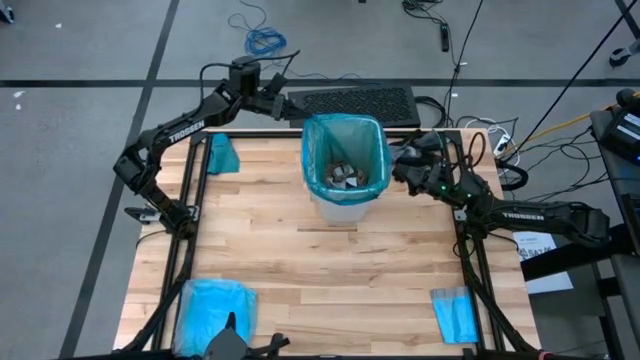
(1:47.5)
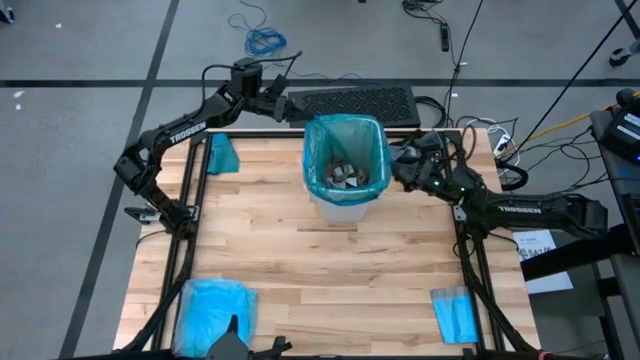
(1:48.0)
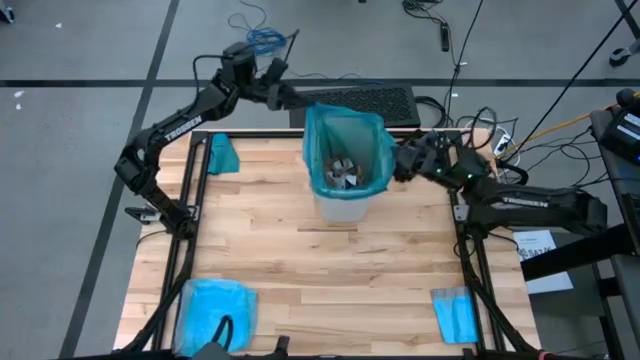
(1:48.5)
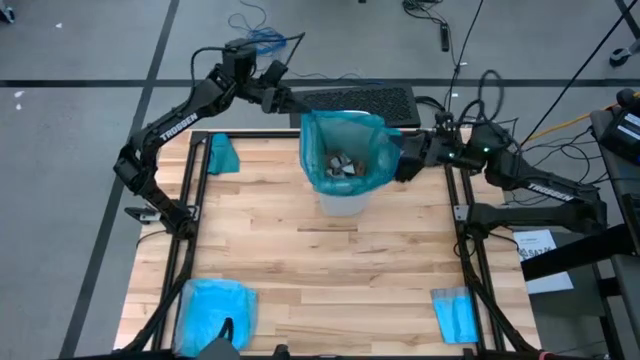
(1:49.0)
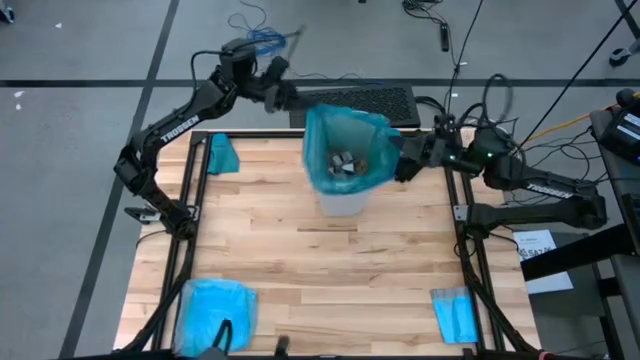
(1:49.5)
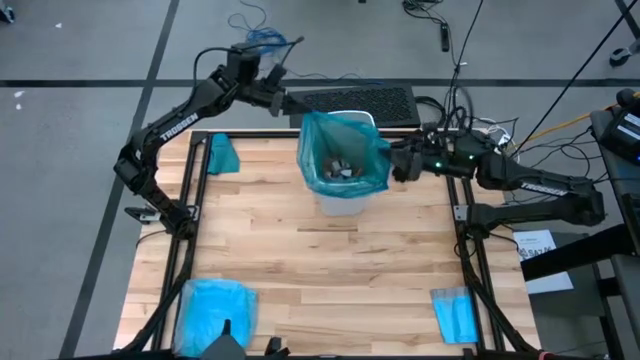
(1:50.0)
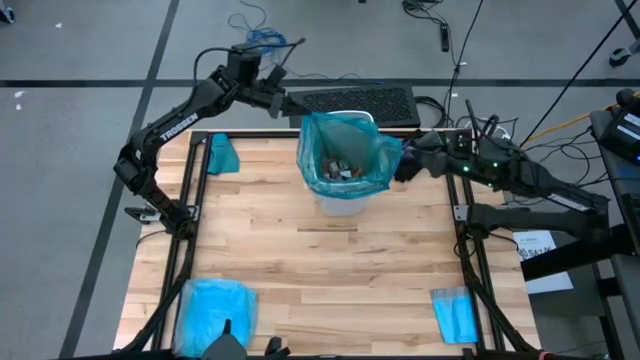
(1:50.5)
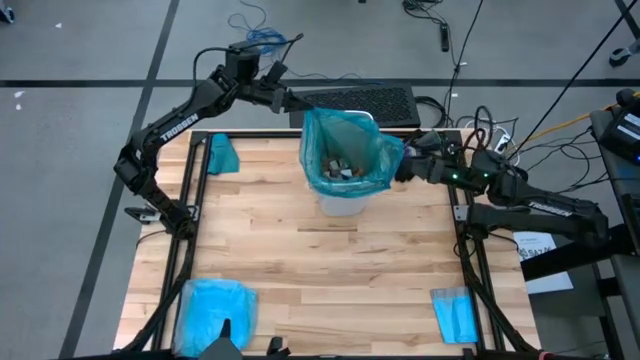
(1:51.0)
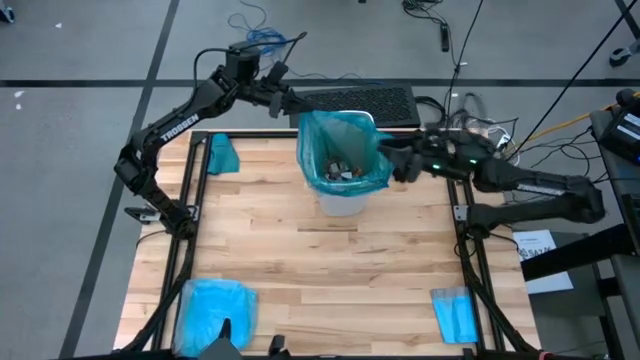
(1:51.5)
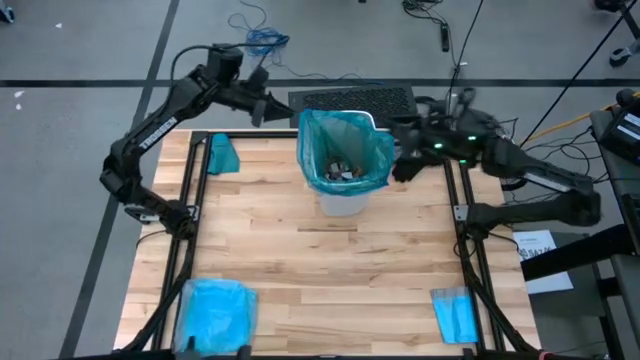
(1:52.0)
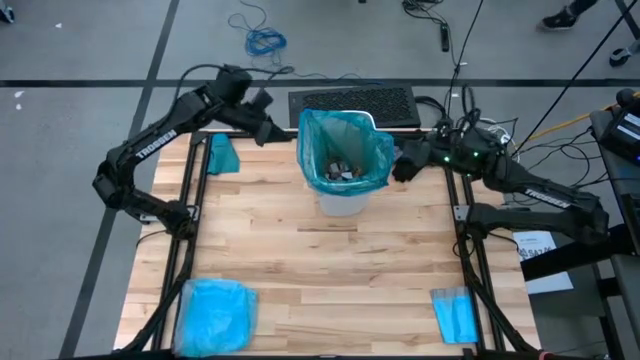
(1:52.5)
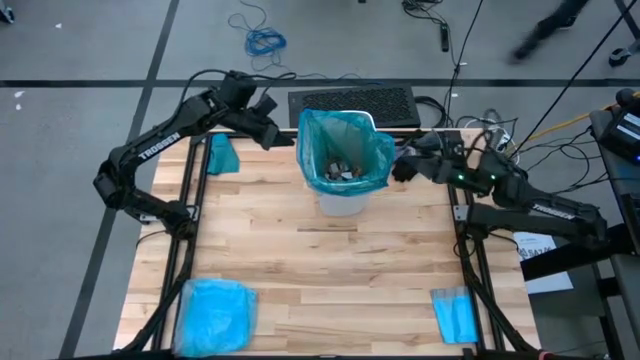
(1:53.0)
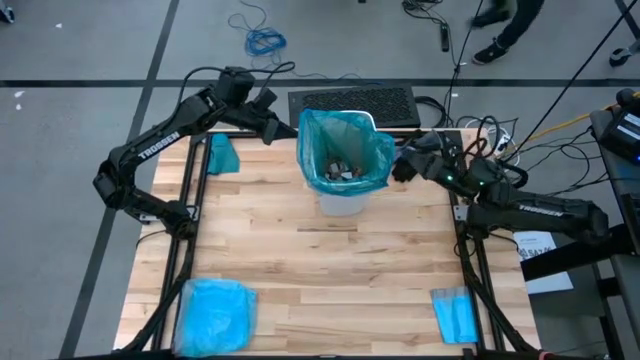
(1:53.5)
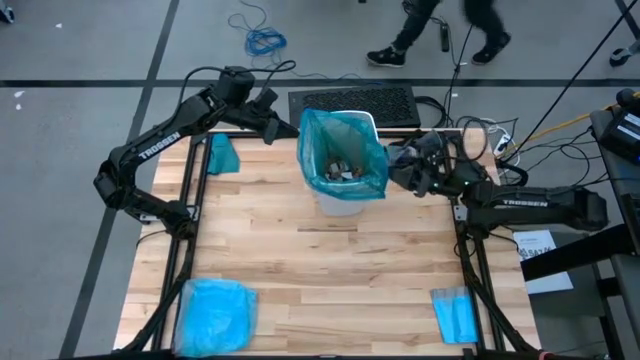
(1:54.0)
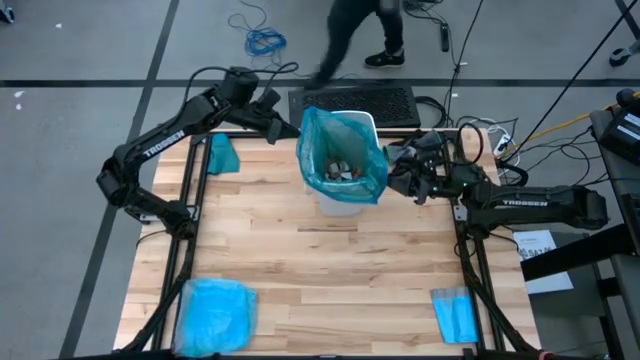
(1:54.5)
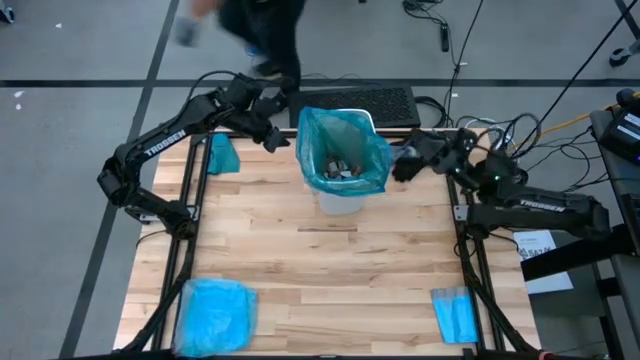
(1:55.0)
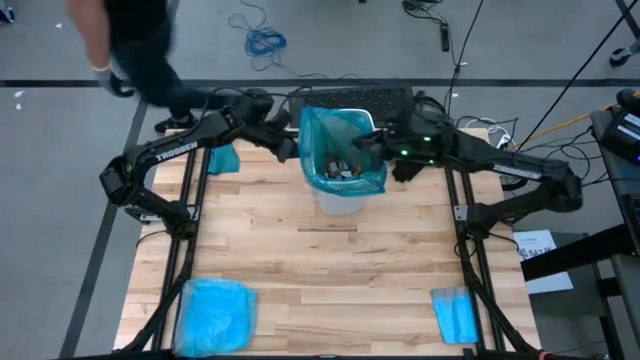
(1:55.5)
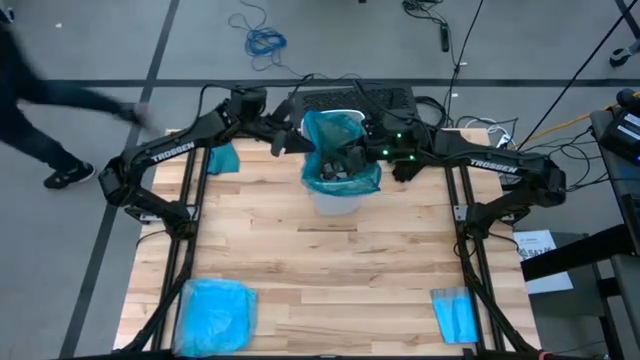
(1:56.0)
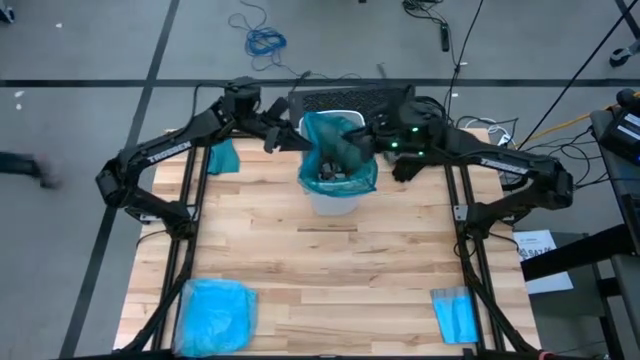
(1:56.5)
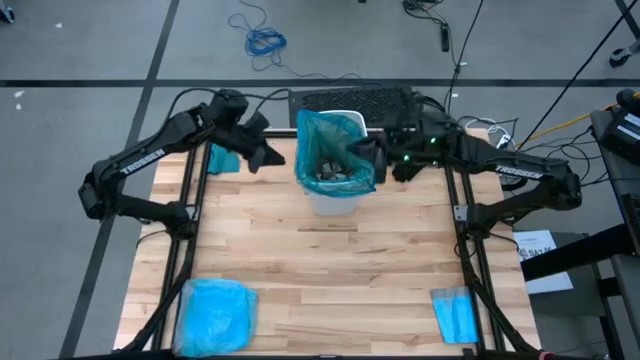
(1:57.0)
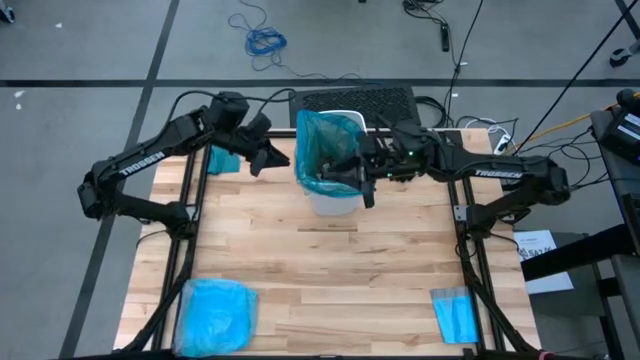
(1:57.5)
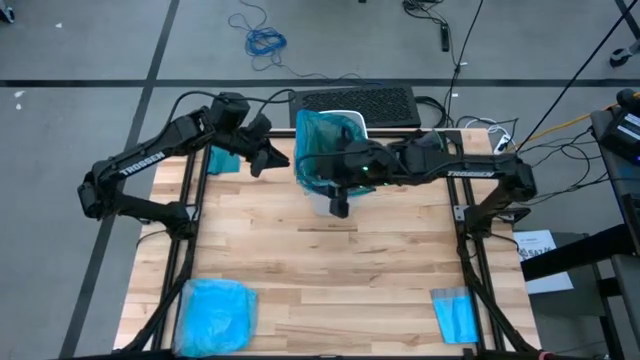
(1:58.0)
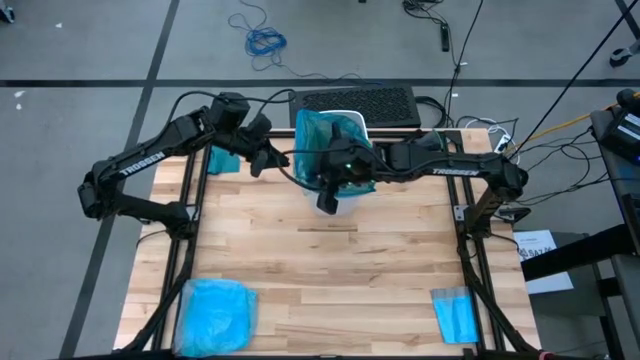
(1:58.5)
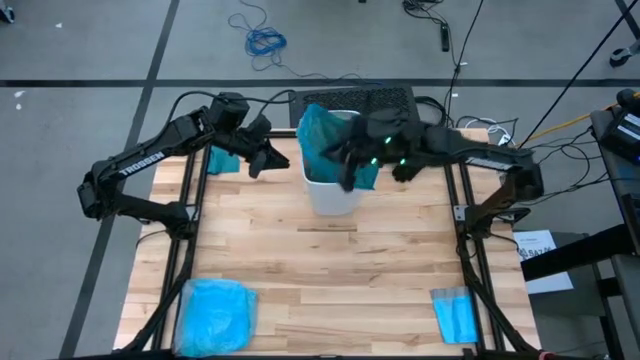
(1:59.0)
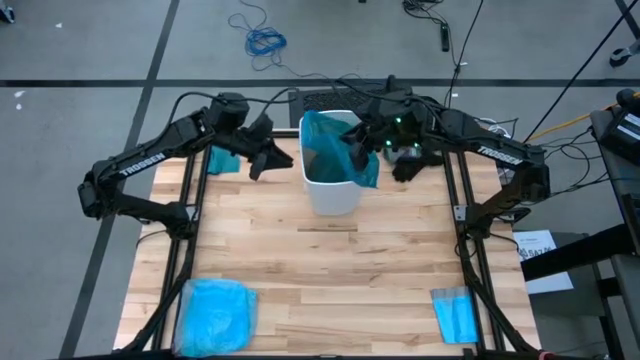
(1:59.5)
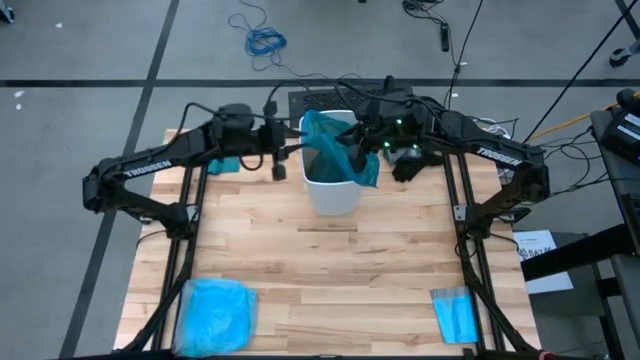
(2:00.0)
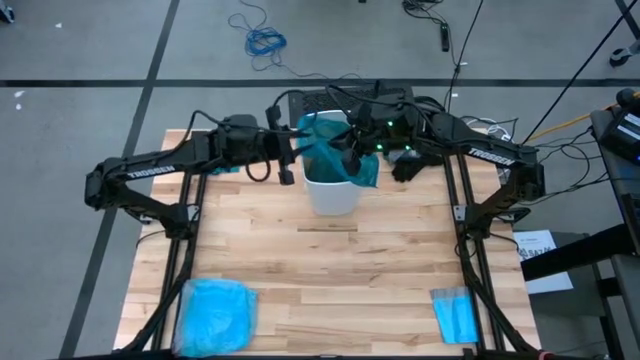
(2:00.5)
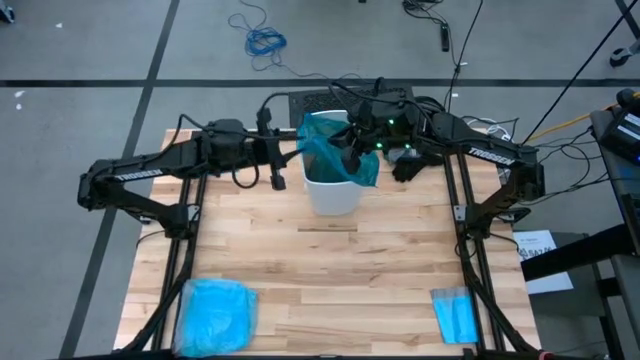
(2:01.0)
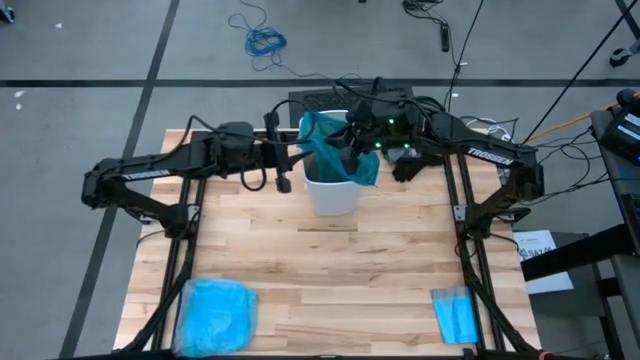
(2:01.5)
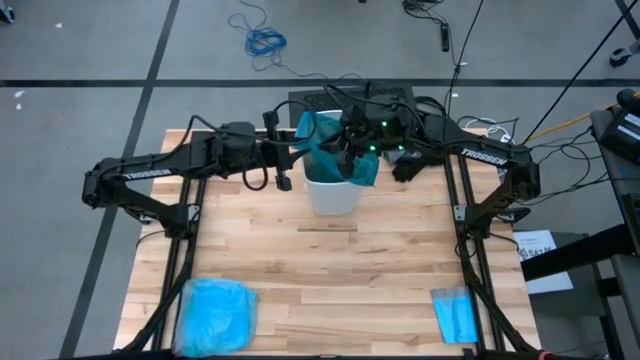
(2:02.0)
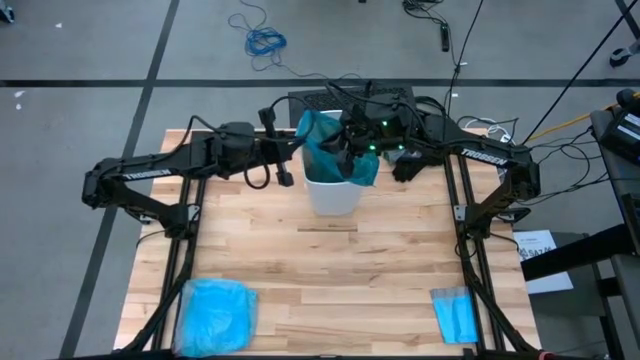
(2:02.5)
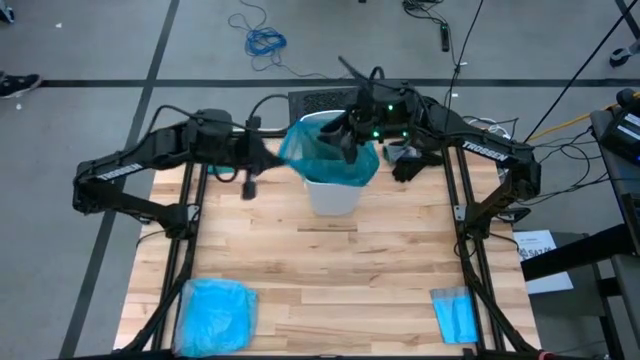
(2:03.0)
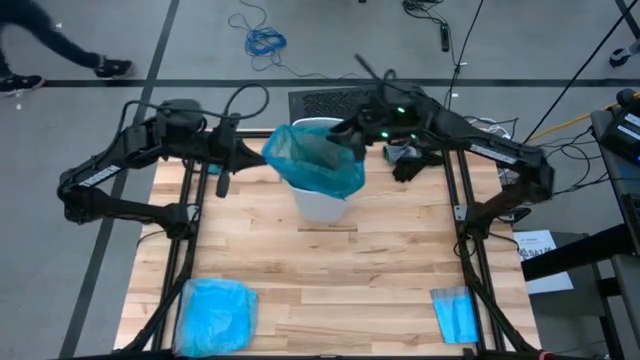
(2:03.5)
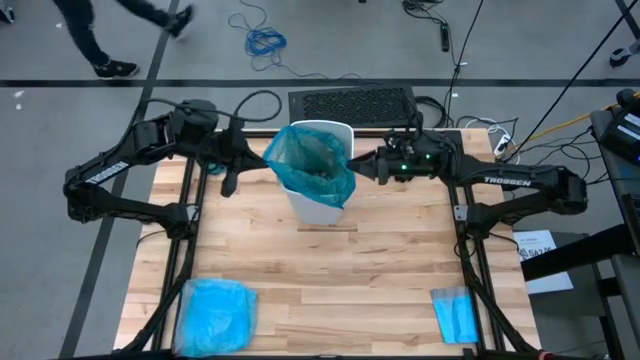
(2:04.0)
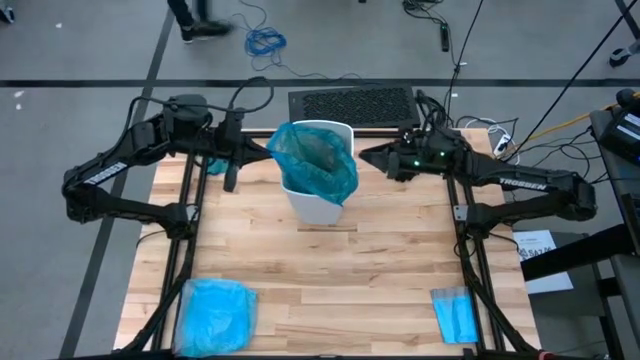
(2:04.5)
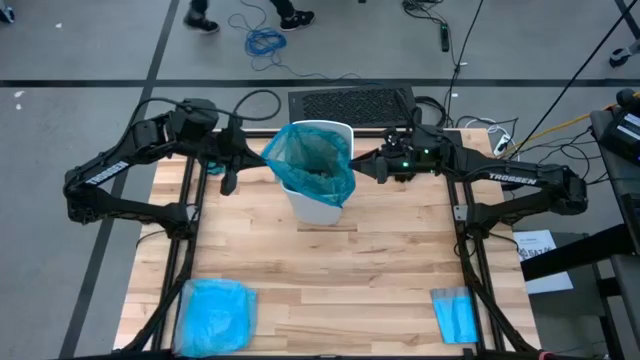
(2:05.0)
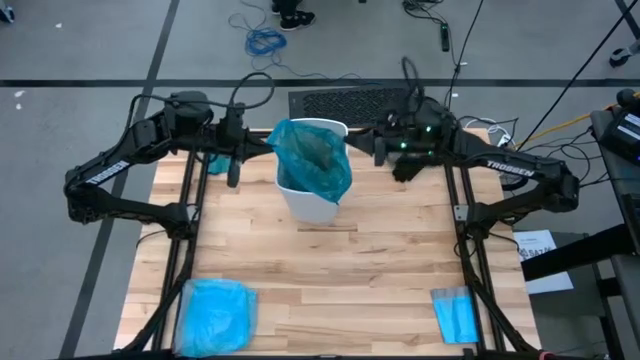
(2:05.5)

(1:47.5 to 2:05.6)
Task: place trash/remove bag and relplace
Remove the blue trash bag from the trash bin

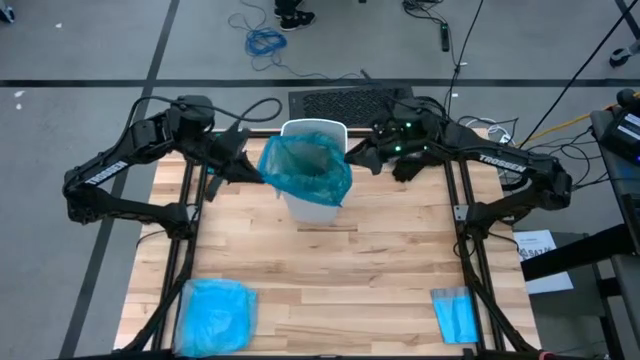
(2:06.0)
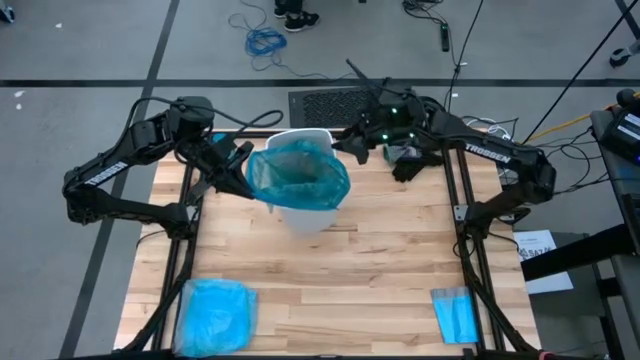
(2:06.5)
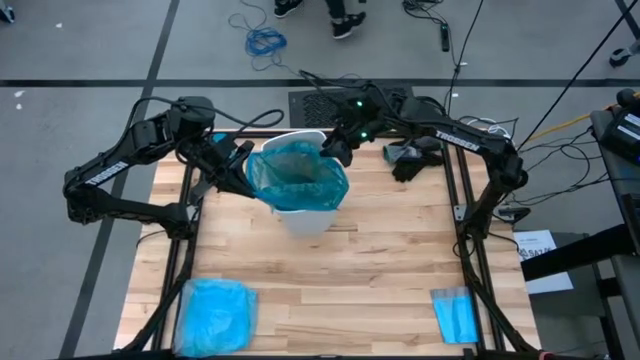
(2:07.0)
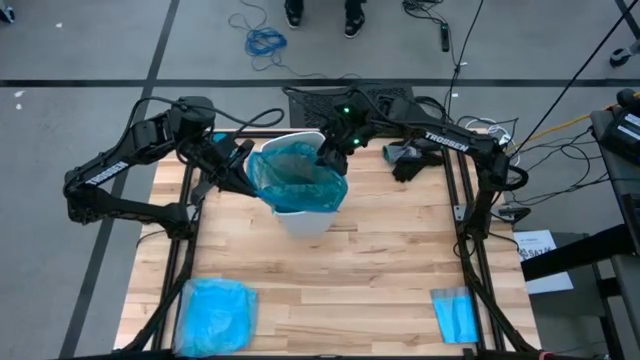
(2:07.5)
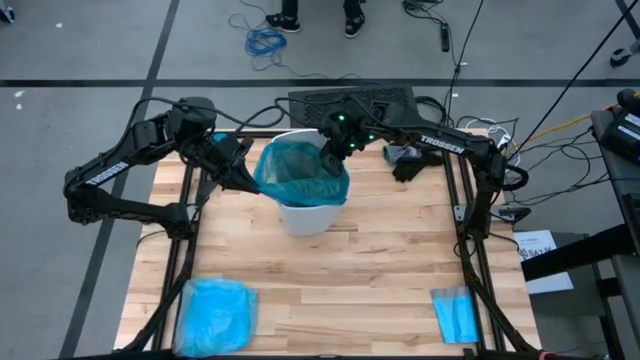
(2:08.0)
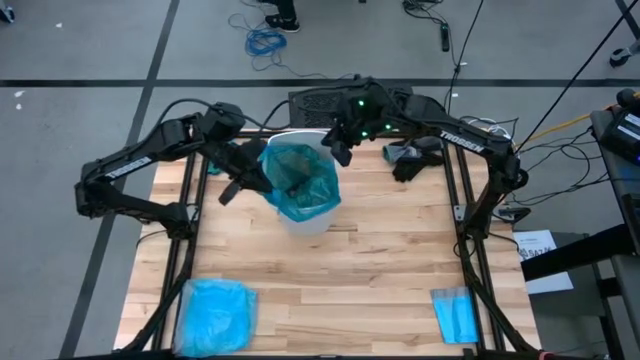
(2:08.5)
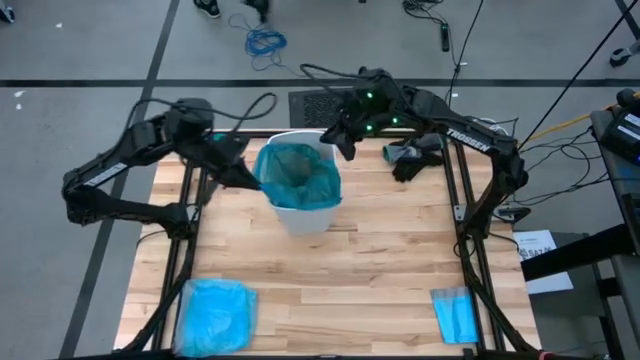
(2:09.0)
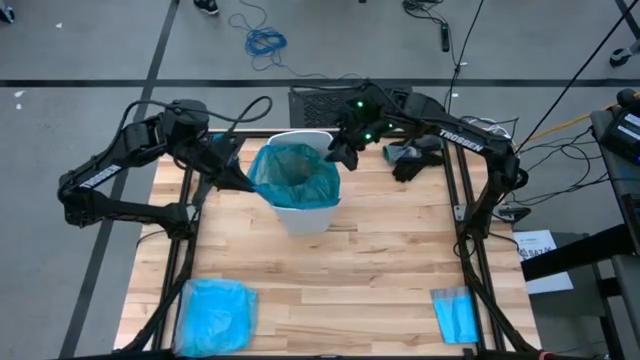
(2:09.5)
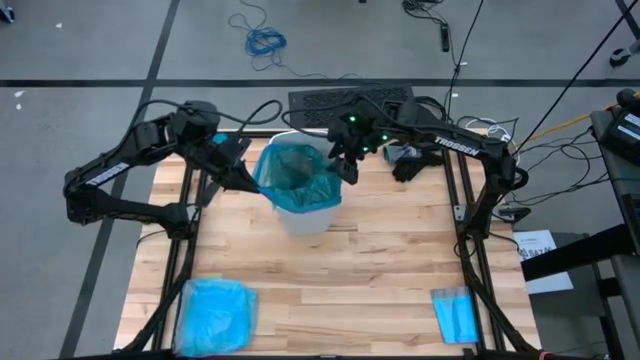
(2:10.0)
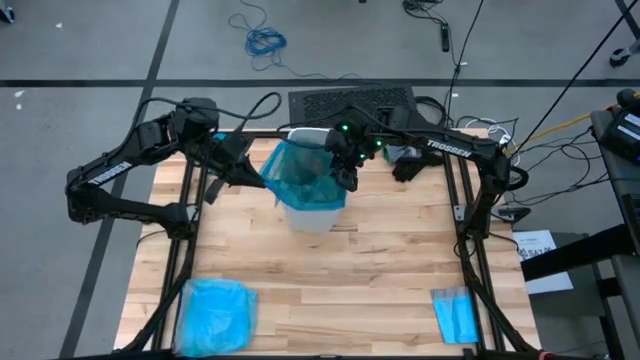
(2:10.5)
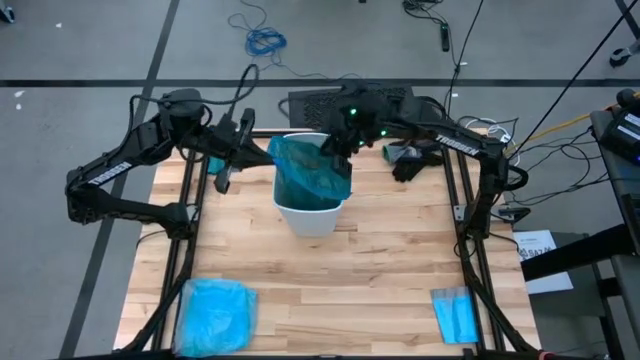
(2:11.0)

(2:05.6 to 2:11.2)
Remove the blue trash bag from the trash bin
